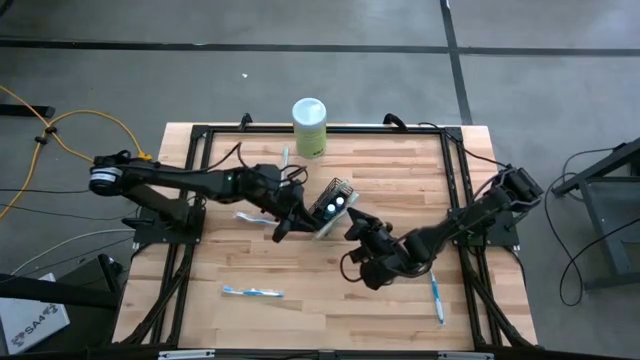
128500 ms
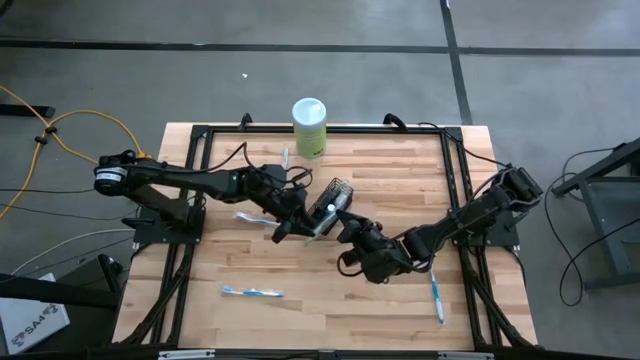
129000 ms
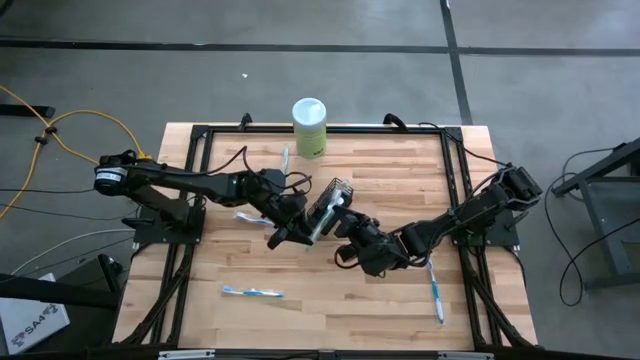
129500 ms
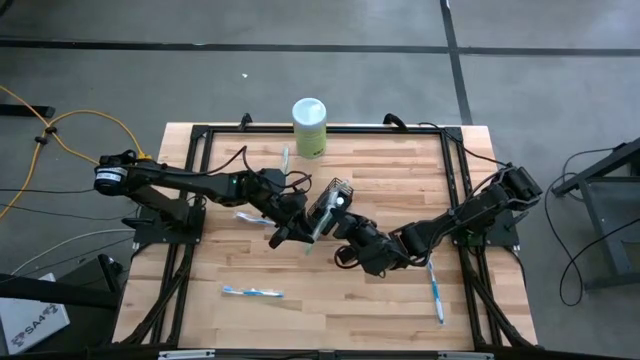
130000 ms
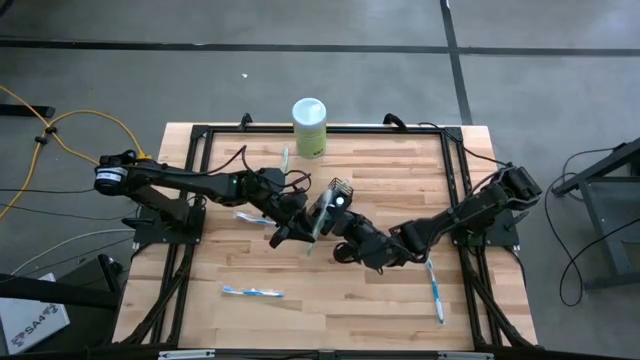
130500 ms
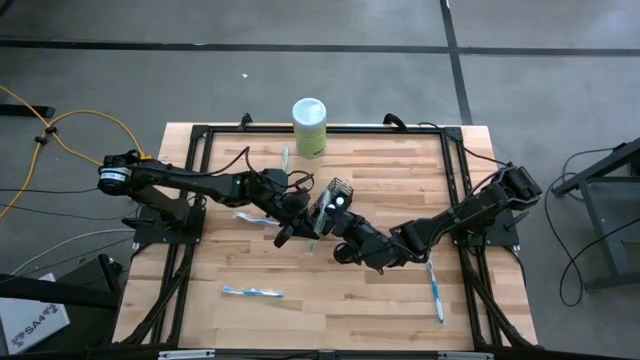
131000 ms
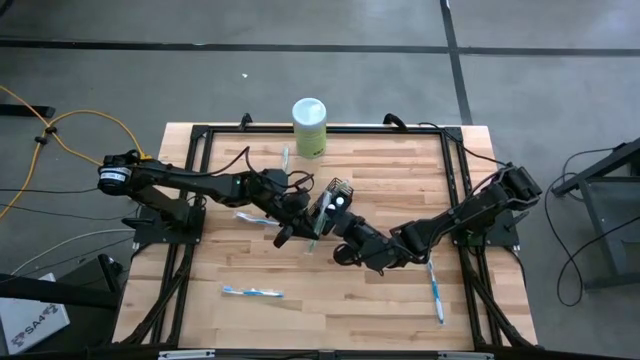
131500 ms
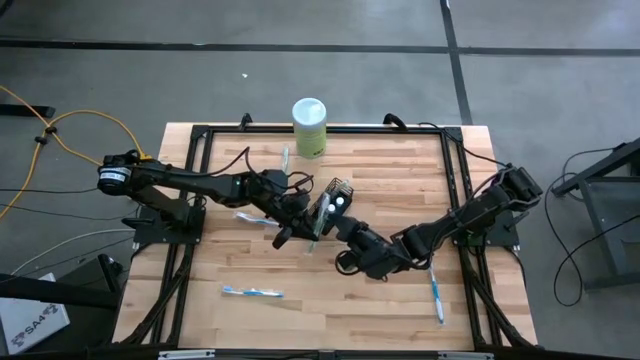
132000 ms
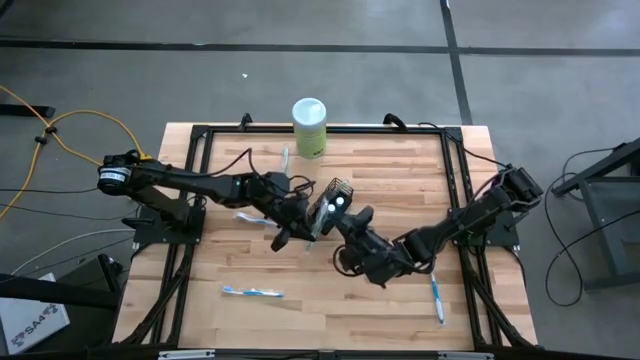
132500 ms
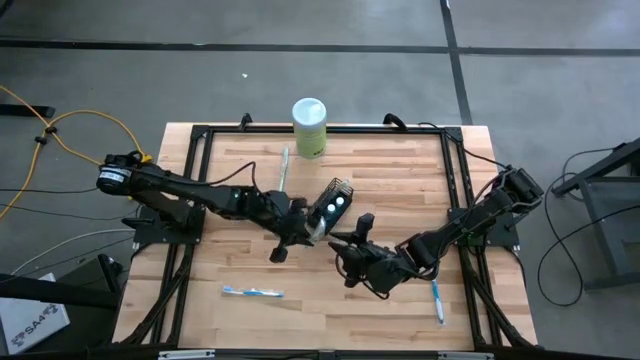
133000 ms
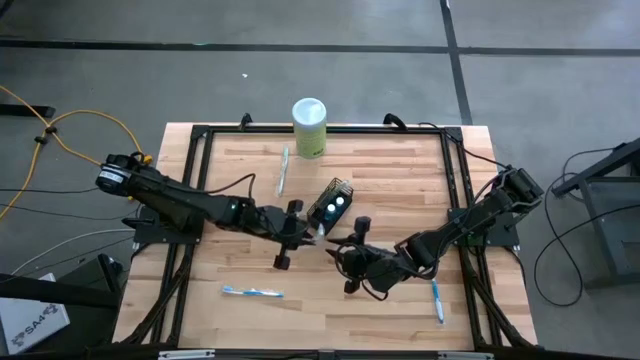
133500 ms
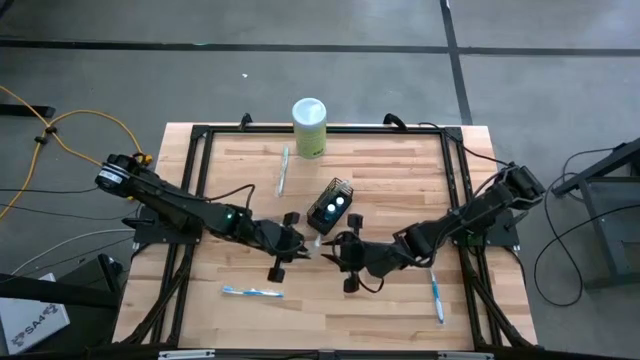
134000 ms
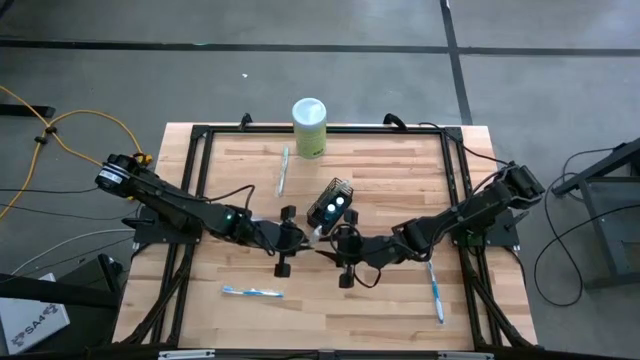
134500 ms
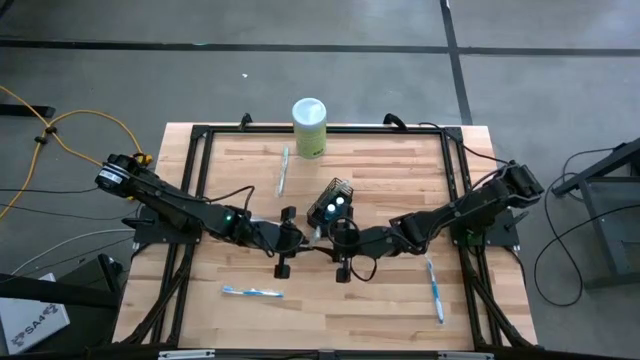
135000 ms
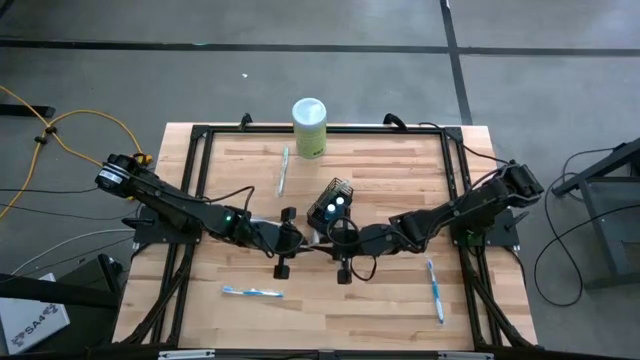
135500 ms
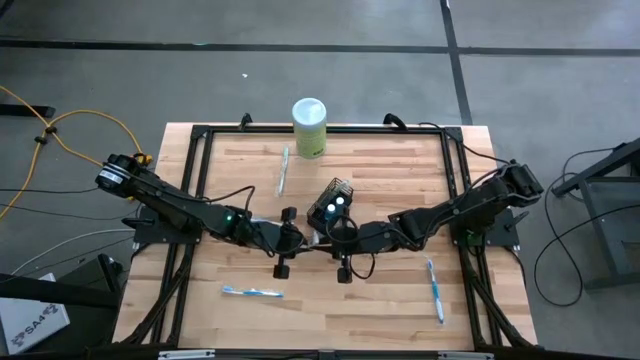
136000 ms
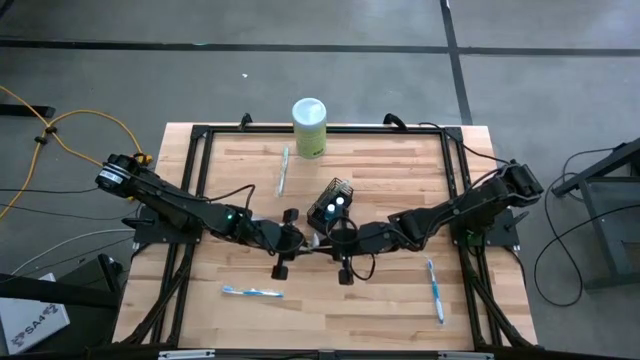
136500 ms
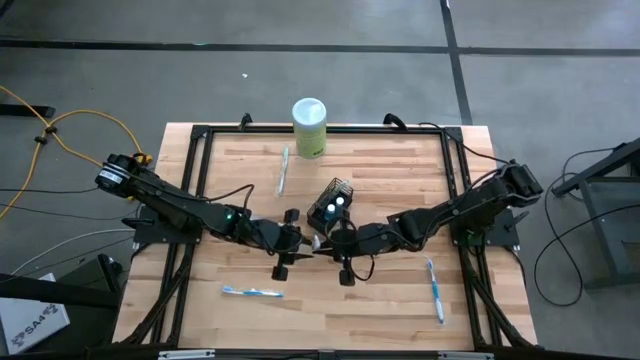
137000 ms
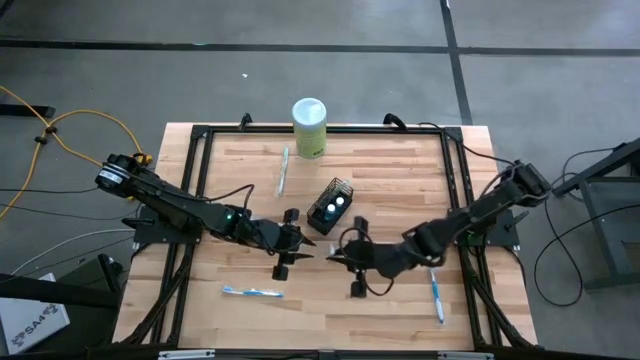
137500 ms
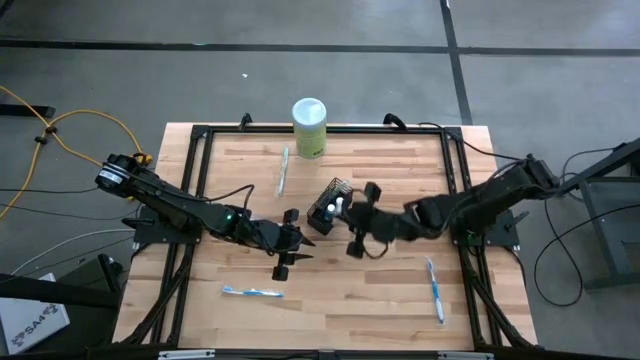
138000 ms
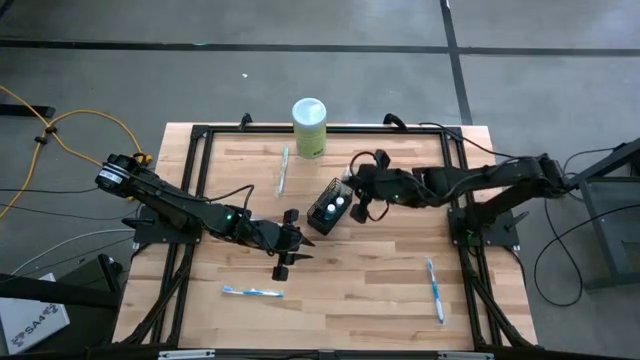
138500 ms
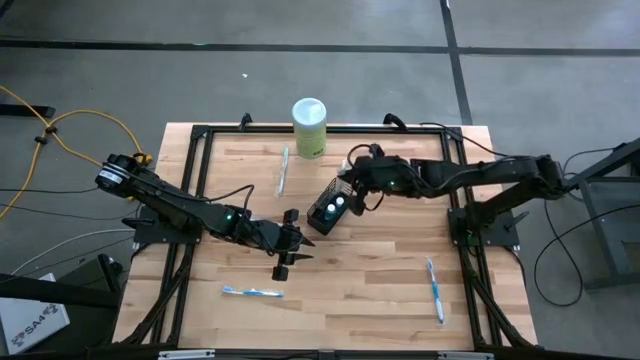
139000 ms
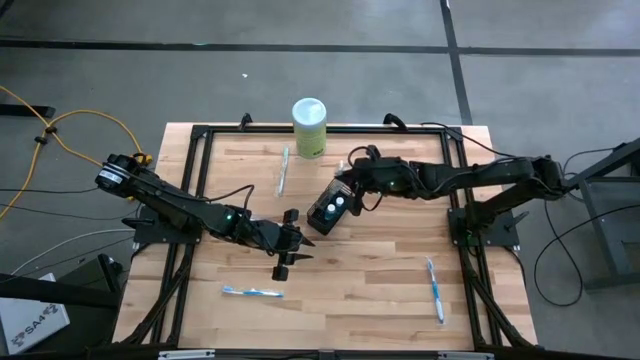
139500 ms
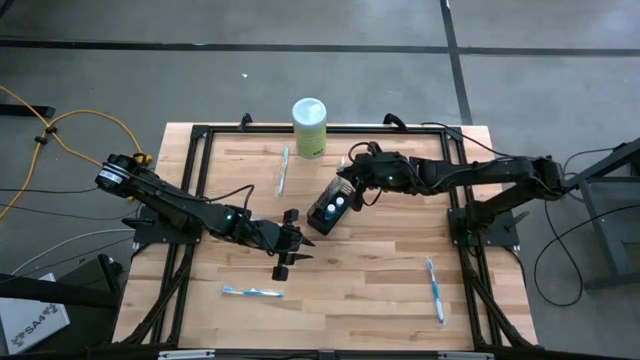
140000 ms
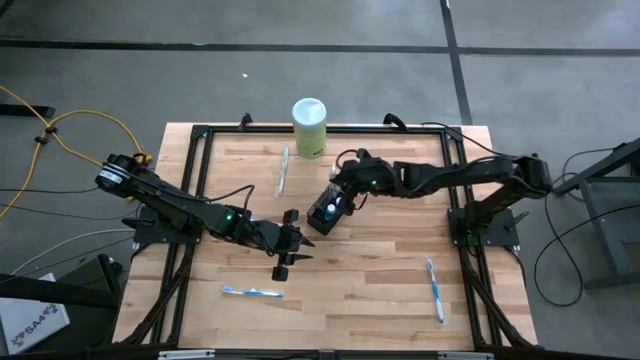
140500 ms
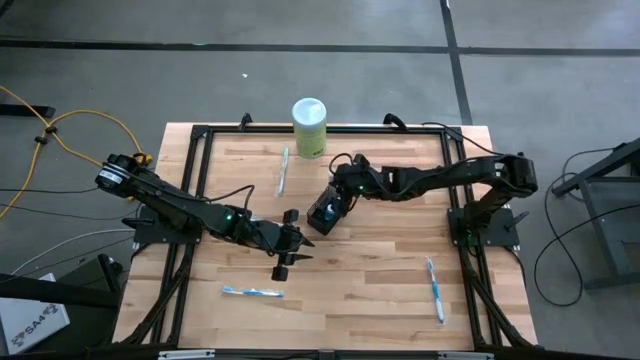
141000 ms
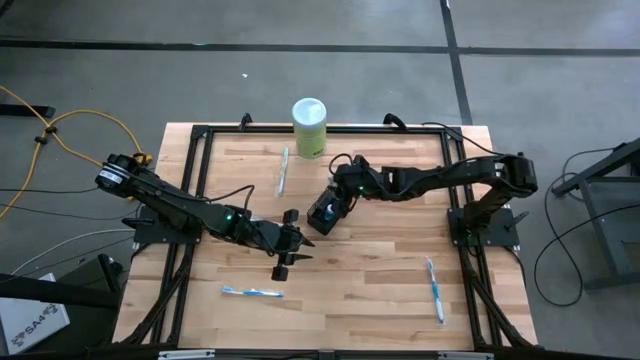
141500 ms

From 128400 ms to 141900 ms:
Task: Pick & Place toothbrushing station
Put the bottom right green toothbrush into the right section of the black wire organizer
